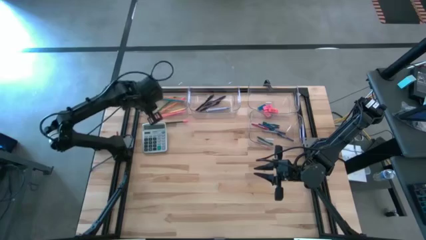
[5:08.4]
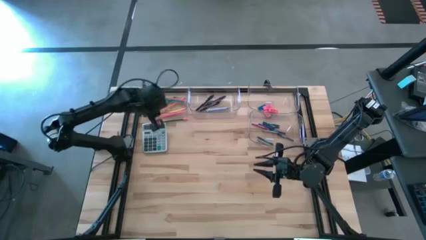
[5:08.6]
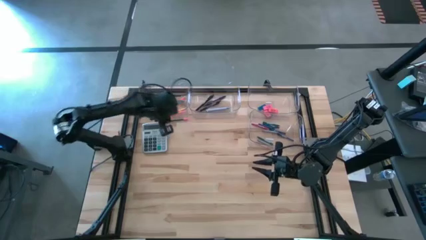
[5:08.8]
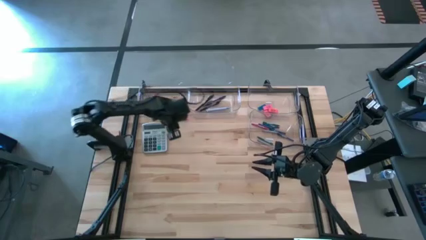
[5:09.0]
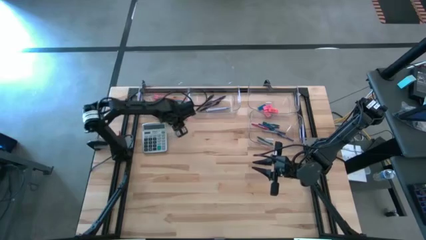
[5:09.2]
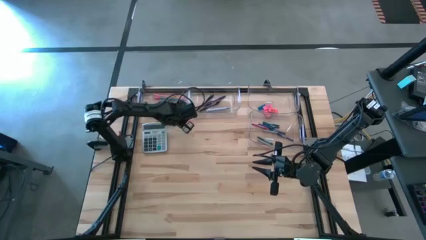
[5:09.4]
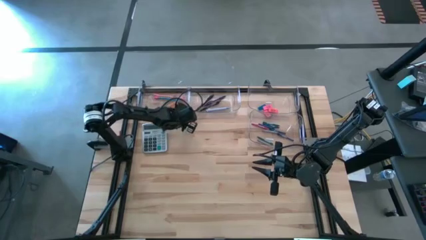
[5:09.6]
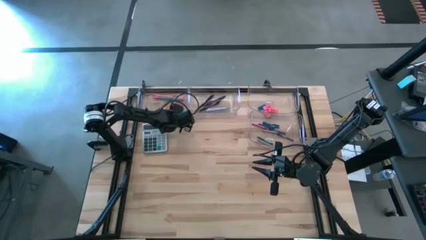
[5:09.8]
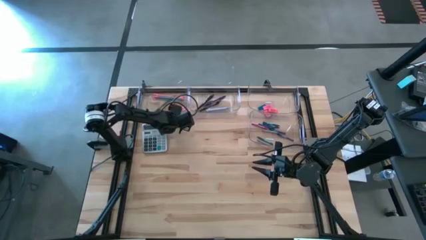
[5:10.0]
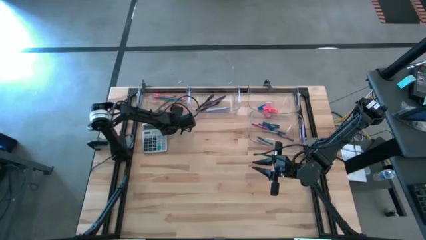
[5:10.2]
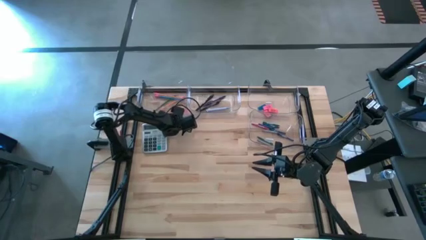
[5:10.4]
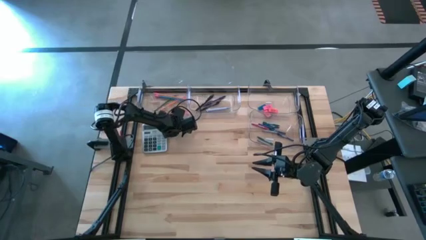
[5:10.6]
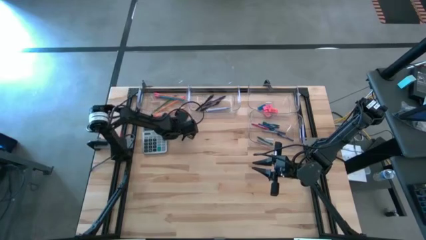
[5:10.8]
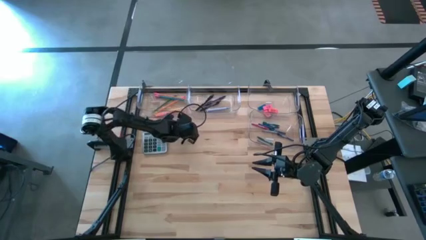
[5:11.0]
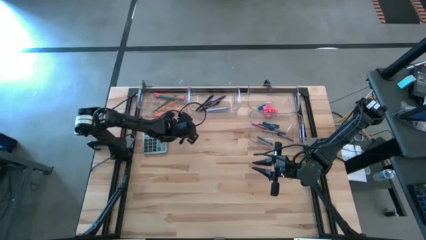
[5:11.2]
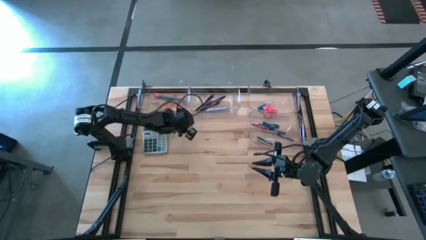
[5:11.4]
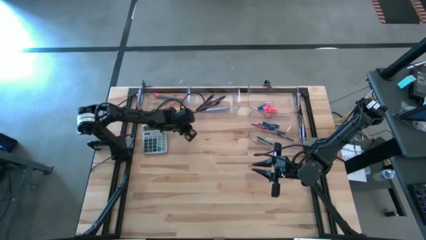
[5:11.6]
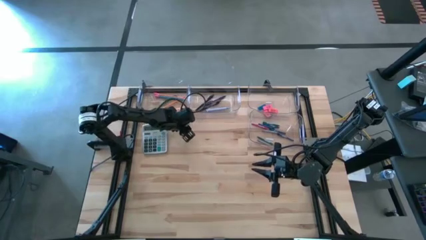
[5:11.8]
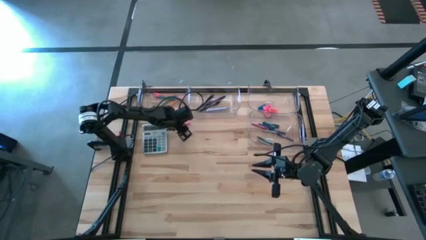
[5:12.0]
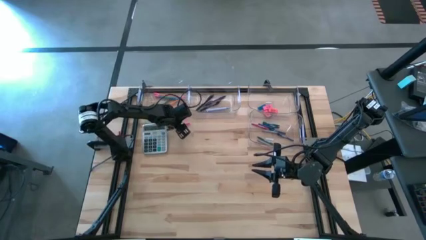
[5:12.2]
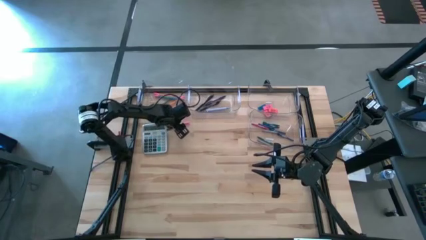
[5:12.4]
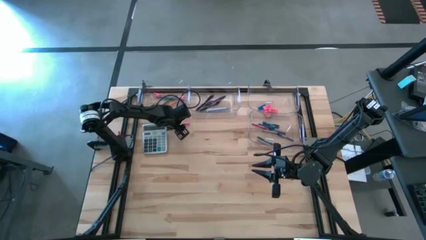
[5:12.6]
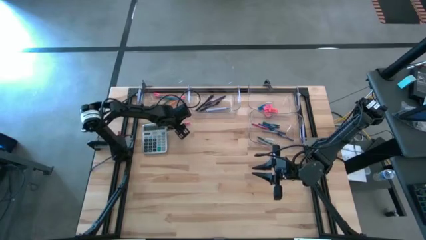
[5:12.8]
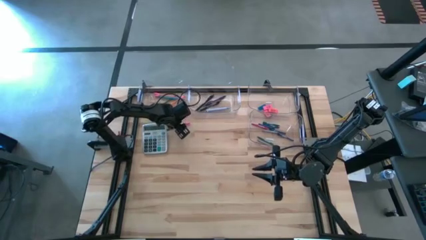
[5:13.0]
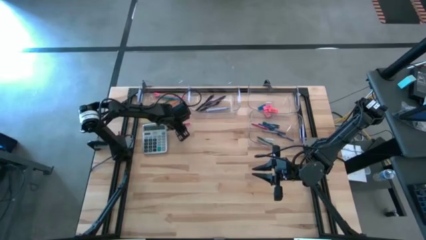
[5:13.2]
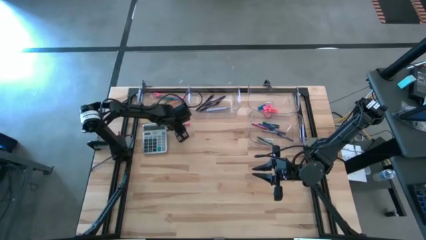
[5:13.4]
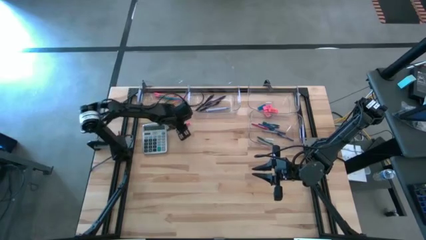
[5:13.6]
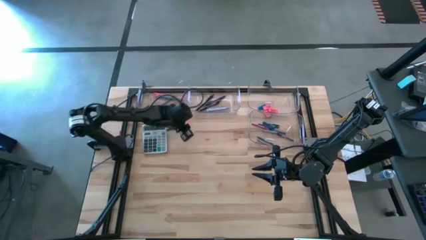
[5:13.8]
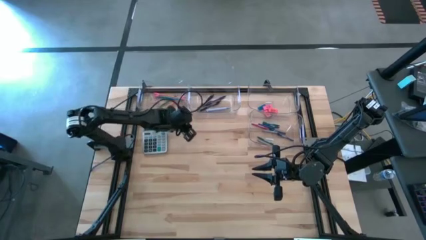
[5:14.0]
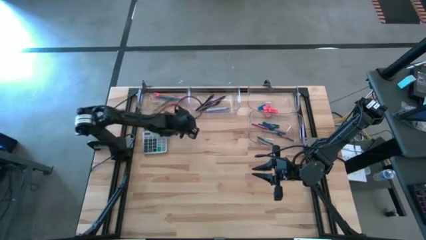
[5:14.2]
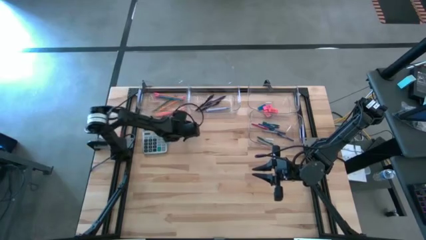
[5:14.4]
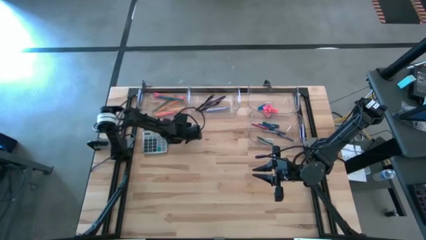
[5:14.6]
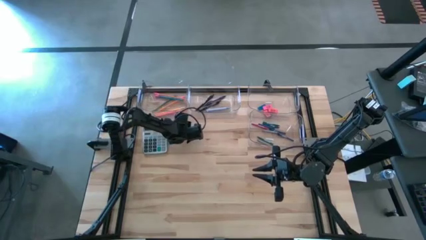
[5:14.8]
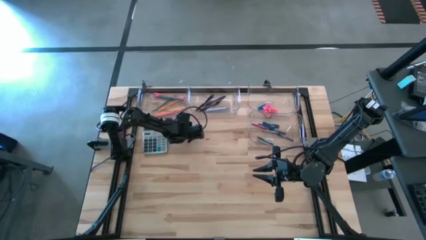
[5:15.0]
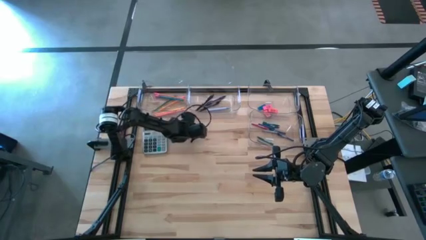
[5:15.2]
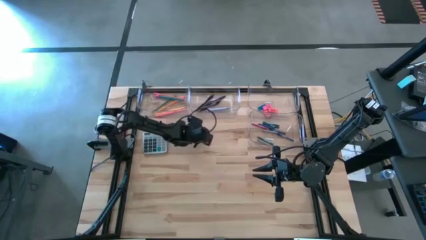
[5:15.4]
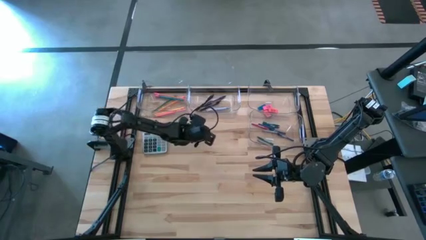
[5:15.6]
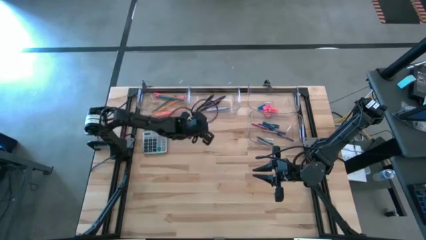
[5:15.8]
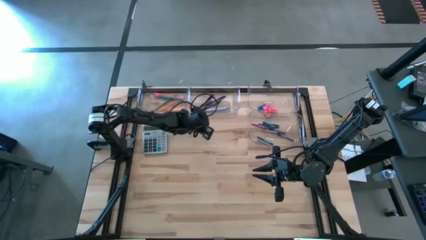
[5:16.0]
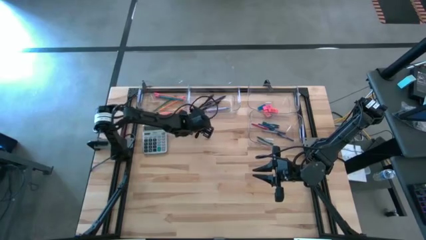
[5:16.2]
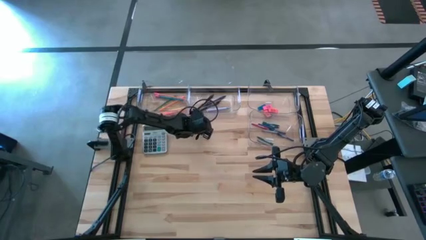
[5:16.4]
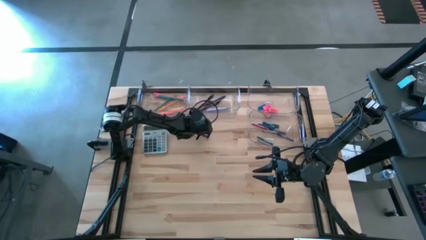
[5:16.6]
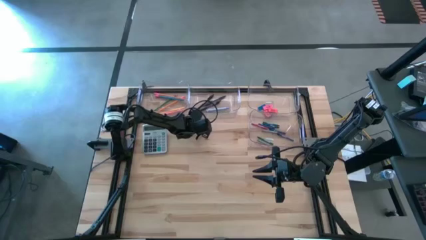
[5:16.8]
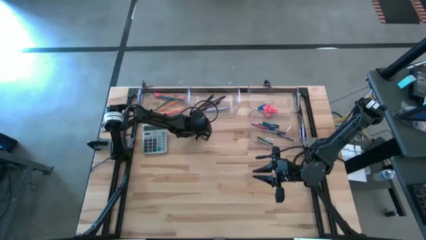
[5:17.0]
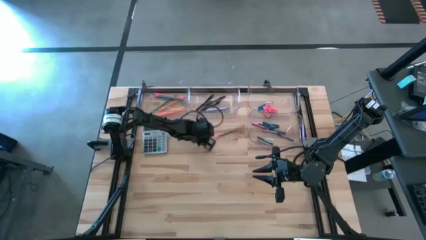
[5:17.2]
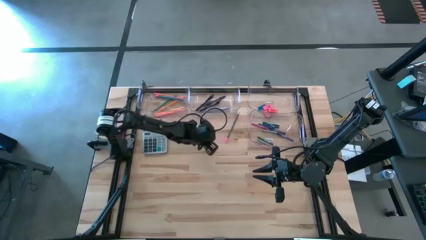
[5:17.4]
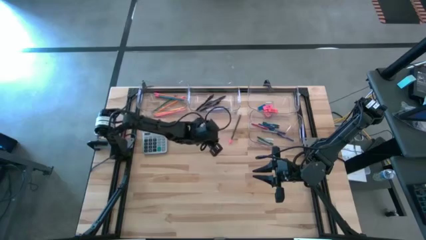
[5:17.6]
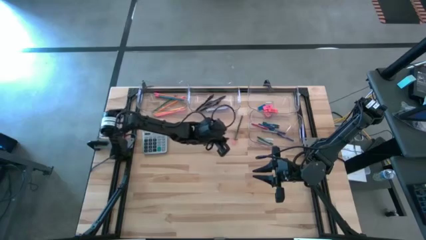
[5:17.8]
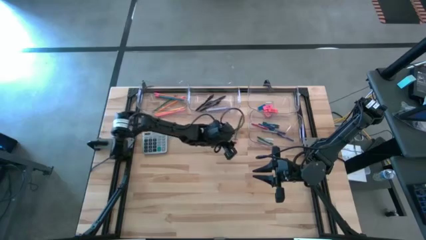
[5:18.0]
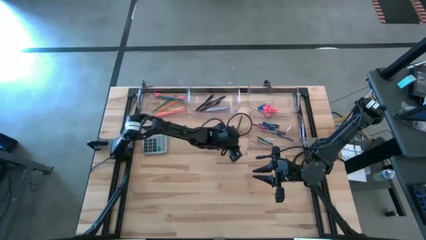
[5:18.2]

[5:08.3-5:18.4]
Task: Sort crayons/erasers/pens/pencils in bins
Put the green pencil into the top left transparent bin

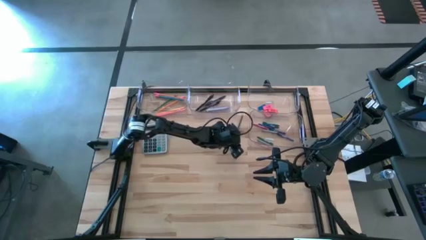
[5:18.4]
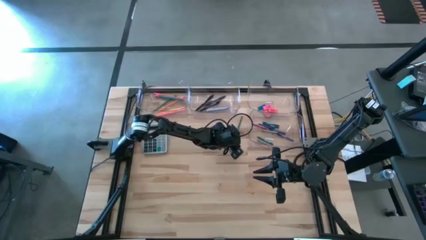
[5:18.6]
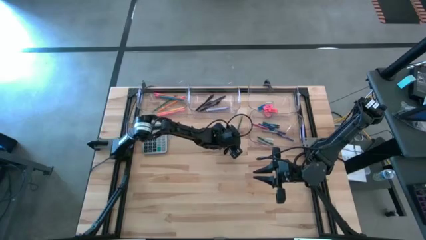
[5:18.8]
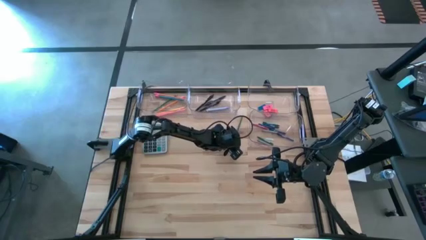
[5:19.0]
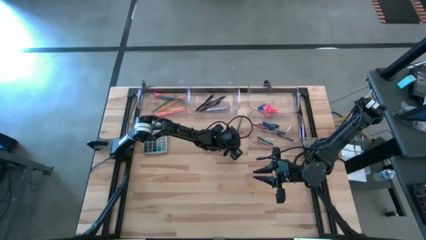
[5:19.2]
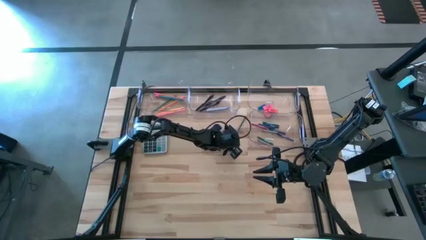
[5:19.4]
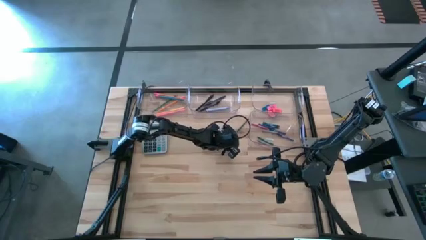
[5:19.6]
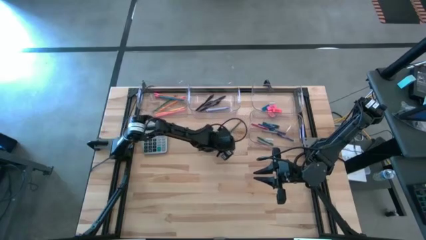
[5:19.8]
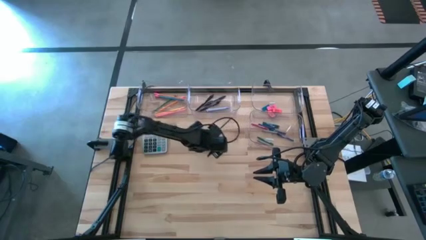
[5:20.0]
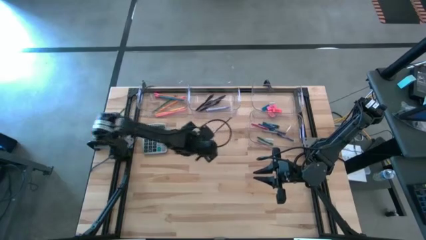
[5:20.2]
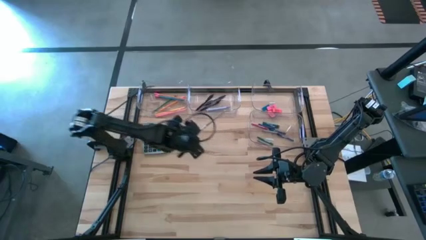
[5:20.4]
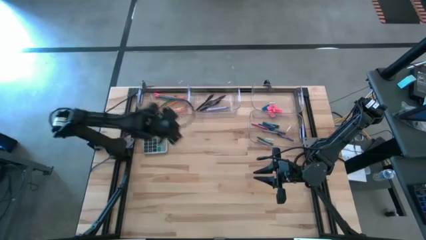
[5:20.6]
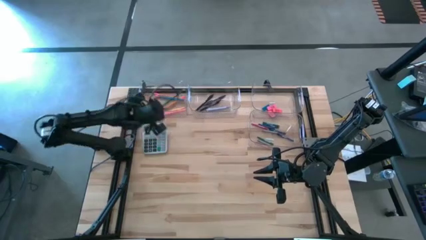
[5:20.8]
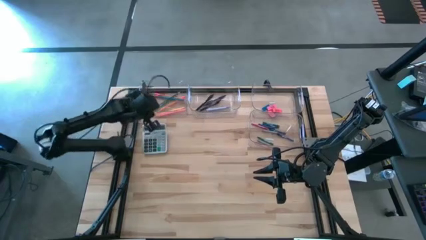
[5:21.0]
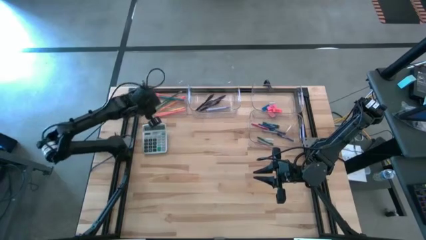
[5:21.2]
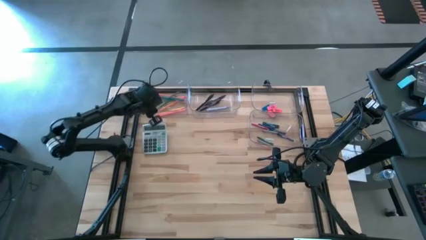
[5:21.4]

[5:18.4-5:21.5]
Put the green pencil into the top left transparent bin

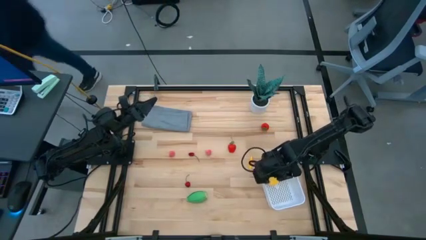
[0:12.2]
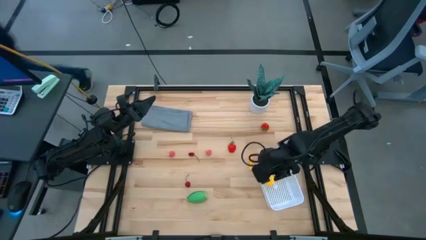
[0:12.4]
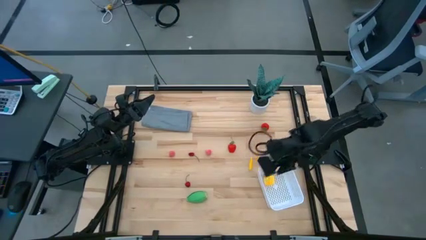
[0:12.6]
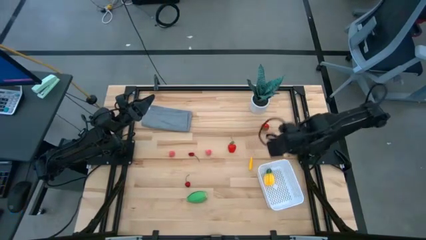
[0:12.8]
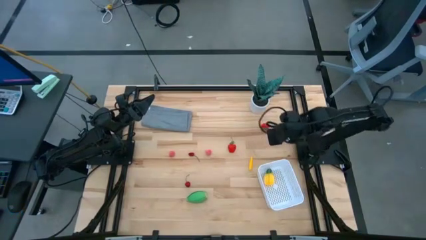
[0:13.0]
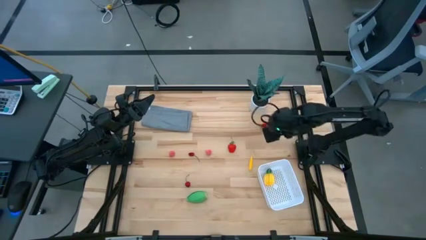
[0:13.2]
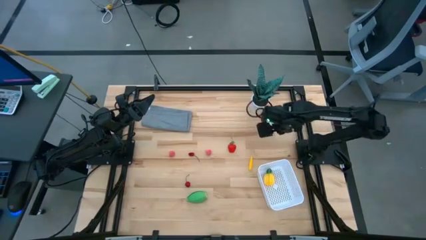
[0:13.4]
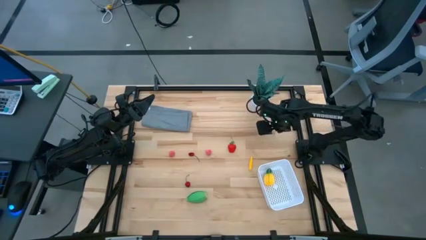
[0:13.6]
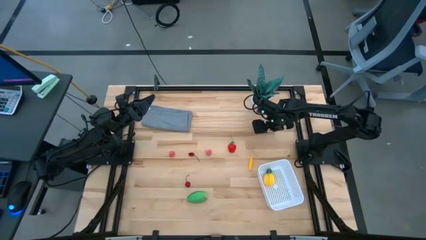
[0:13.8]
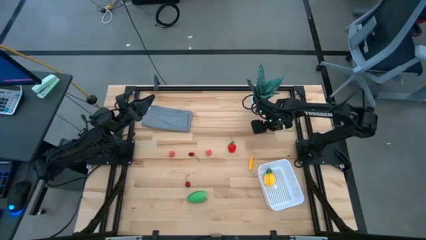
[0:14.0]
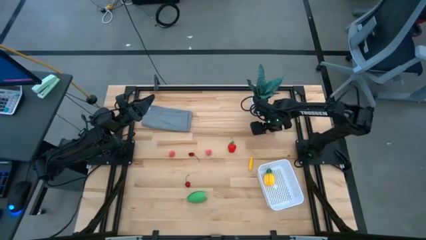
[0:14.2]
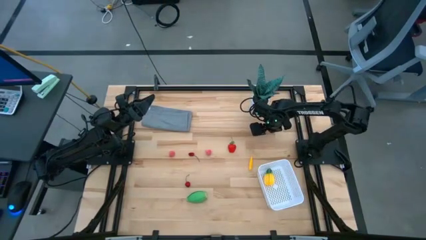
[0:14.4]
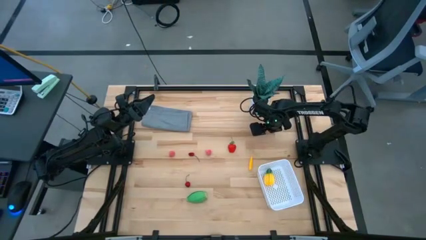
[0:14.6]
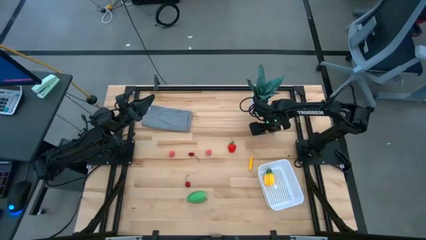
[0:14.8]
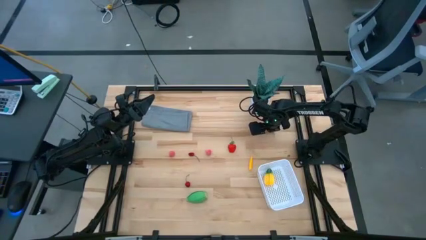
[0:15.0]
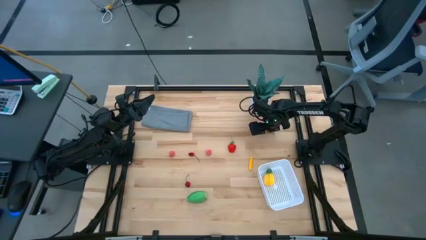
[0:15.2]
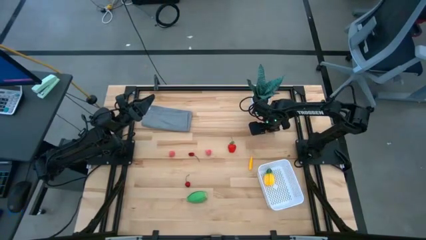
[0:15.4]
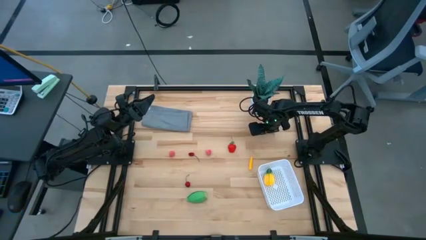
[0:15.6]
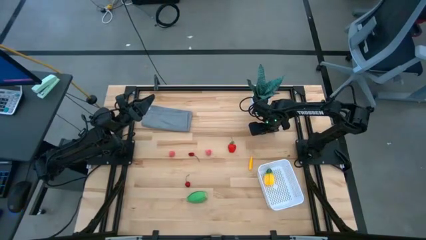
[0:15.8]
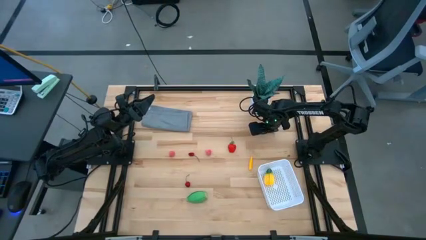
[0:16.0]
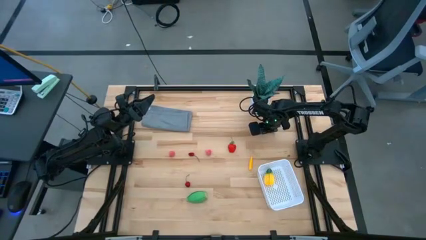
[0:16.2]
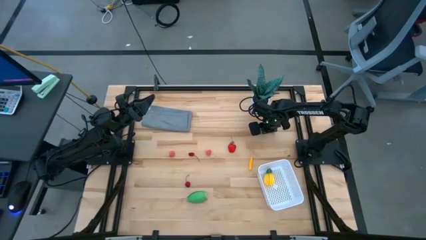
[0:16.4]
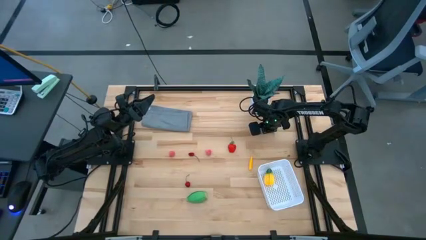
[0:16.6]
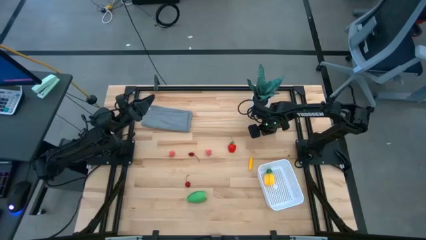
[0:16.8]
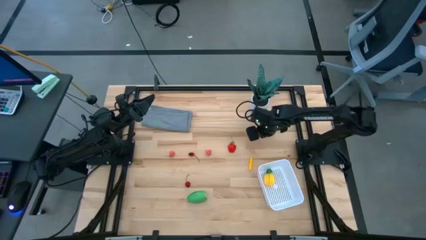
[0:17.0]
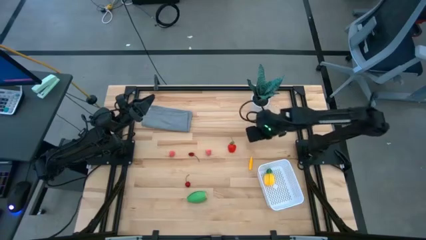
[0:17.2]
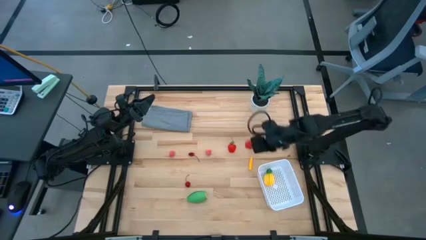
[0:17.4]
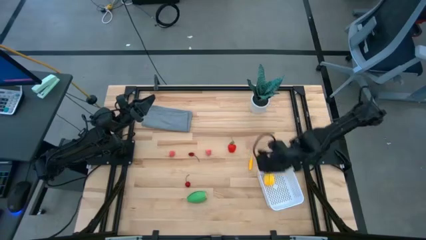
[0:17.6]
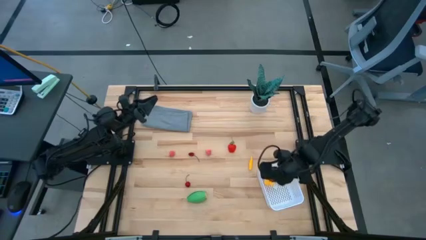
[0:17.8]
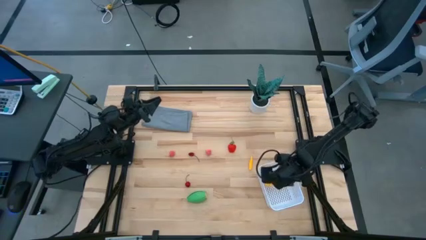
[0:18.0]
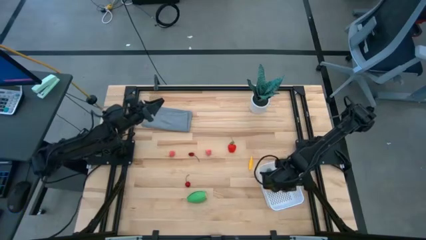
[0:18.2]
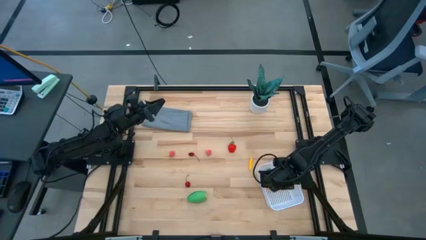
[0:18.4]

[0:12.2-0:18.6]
Task: Pick and placing Produce into tupperware
Put the top strawberry into the white bin
